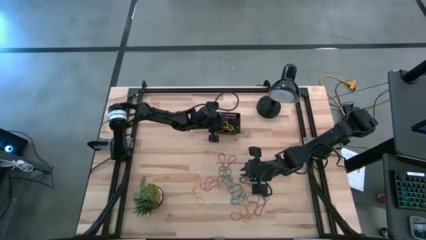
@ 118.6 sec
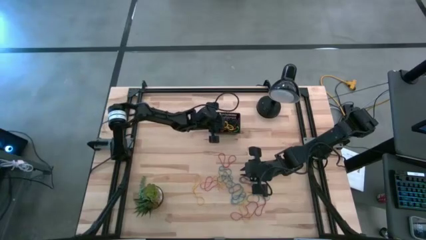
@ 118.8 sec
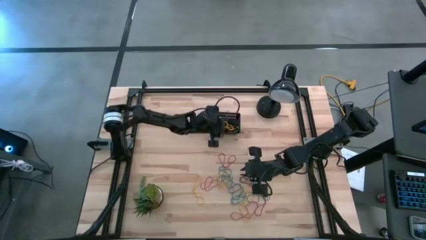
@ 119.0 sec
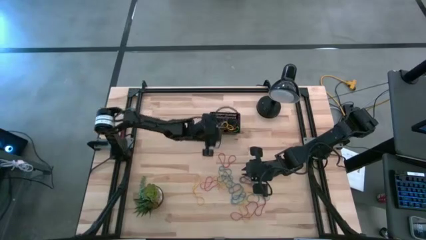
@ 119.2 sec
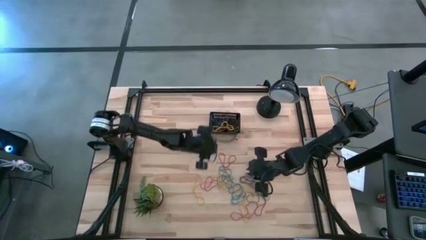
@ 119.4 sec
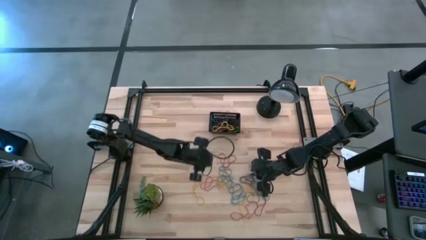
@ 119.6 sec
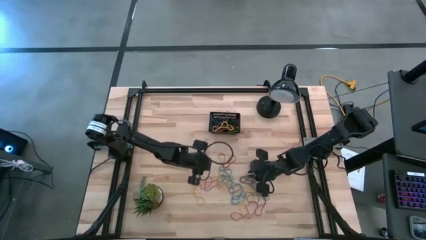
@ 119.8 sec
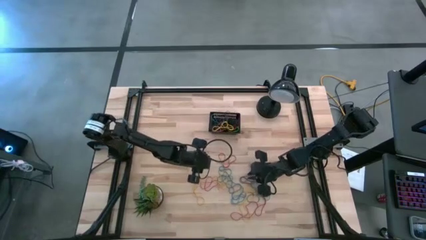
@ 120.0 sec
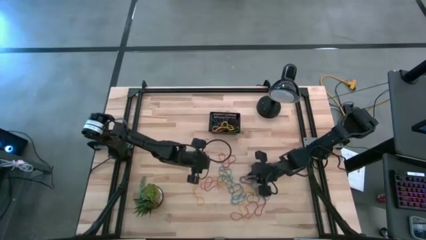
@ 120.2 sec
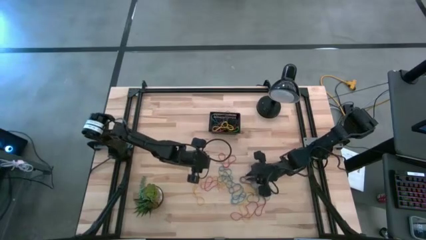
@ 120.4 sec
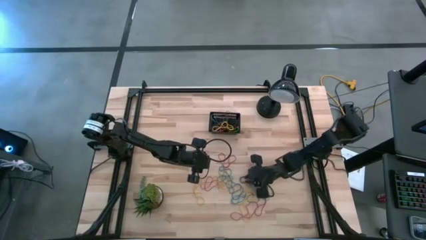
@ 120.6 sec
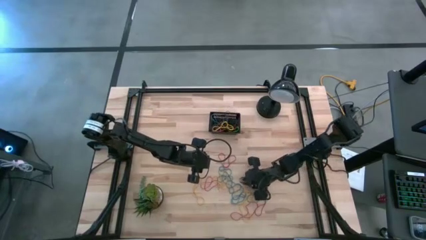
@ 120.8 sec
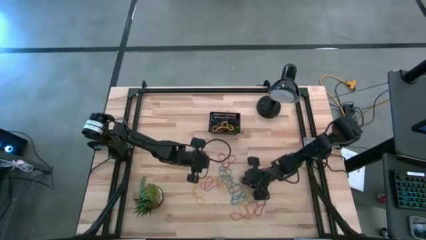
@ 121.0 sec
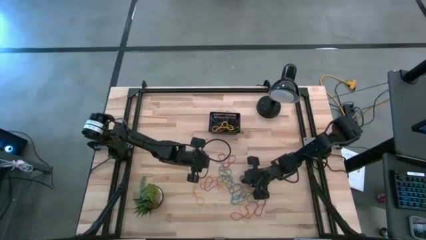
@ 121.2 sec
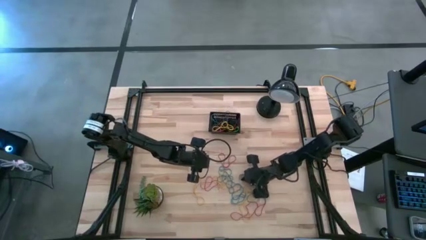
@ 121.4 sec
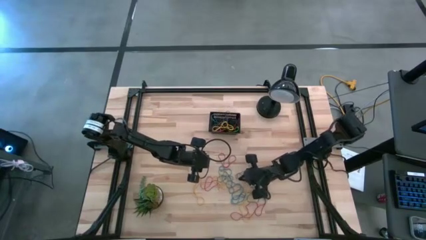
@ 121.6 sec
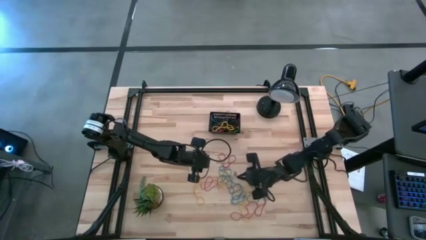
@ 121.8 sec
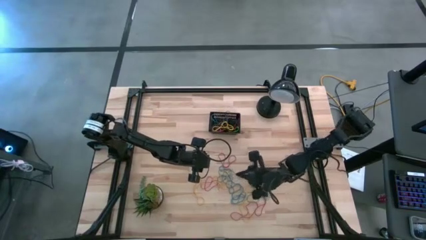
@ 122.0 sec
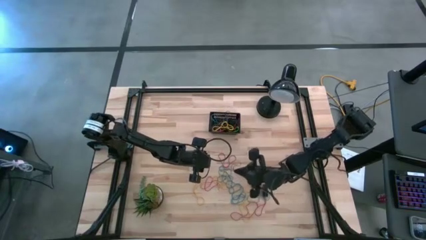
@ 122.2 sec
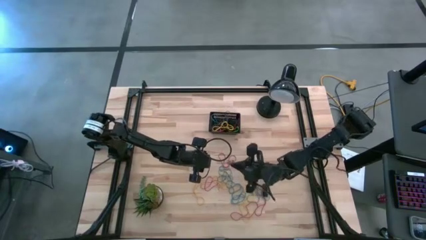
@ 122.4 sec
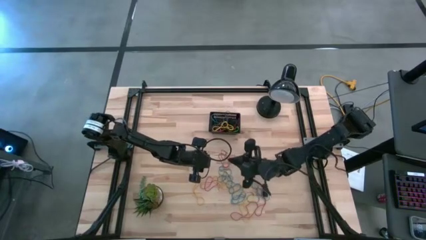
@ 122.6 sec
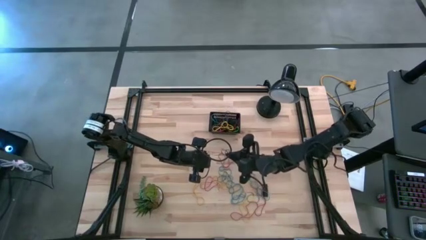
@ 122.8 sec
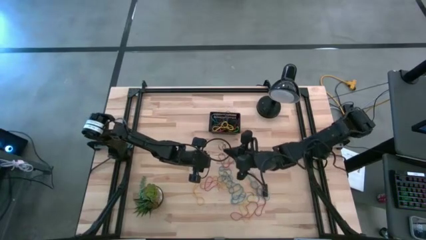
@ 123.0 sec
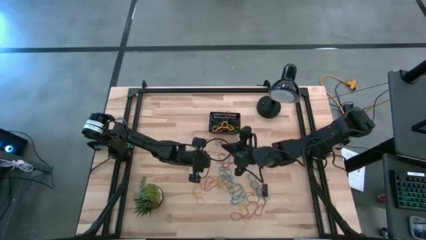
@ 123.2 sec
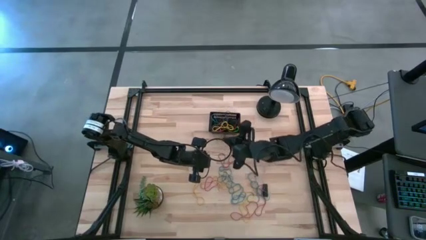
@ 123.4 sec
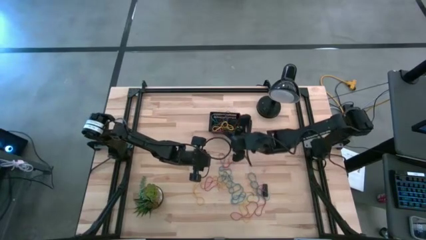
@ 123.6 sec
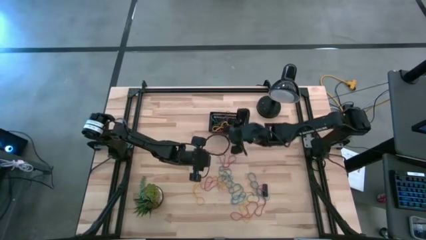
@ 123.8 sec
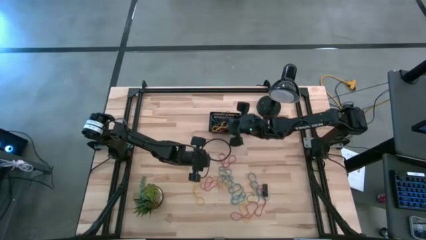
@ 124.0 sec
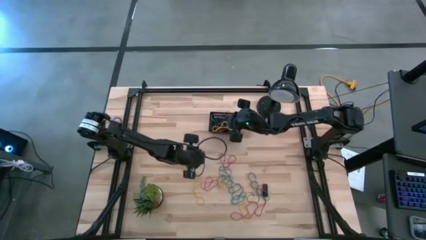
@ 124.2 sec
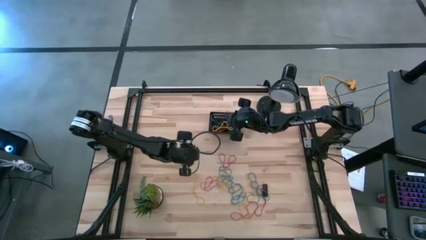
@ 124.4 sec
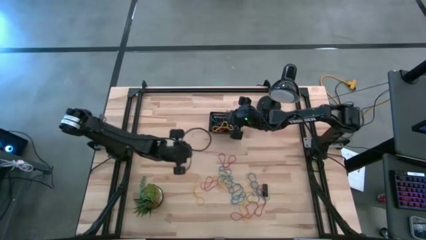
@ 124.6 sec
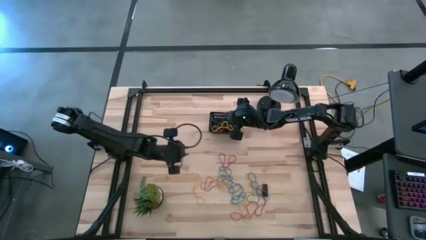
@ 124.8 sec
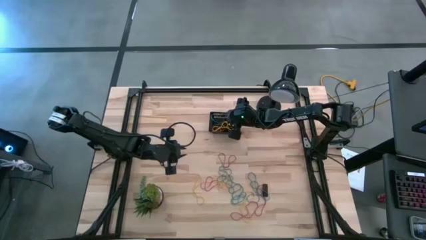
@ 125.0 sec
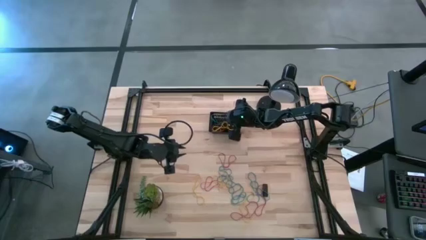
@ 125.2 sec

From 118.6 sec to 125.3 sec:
Task: Pick and place rubber bands into bin
Put the purple rubber band into the basket

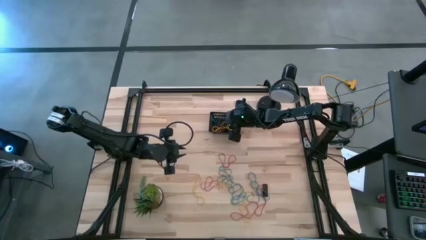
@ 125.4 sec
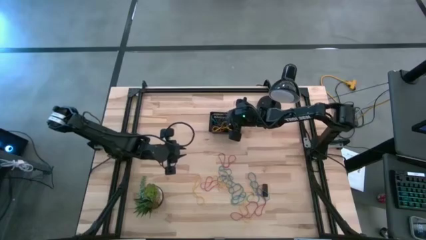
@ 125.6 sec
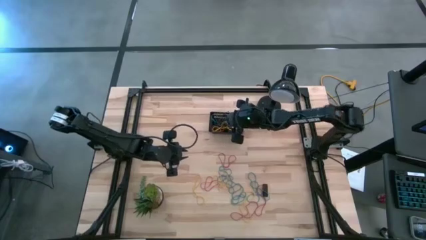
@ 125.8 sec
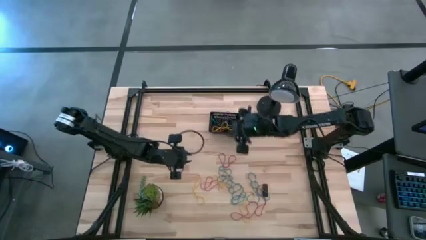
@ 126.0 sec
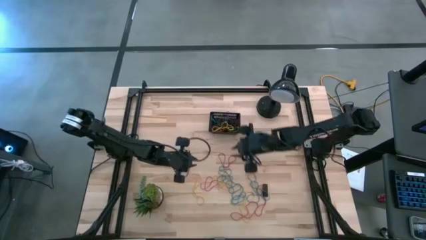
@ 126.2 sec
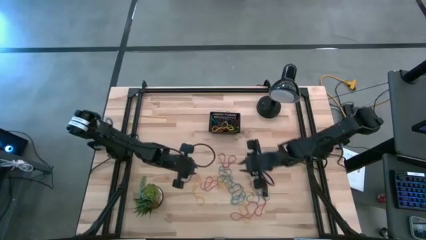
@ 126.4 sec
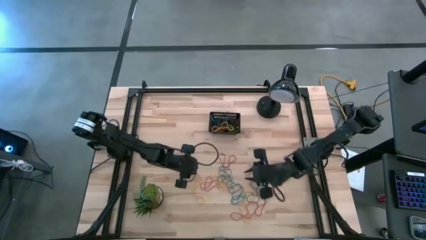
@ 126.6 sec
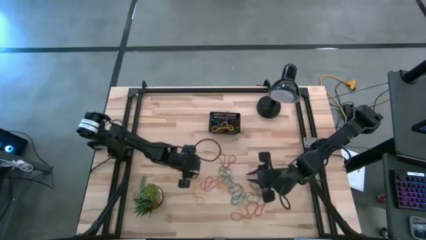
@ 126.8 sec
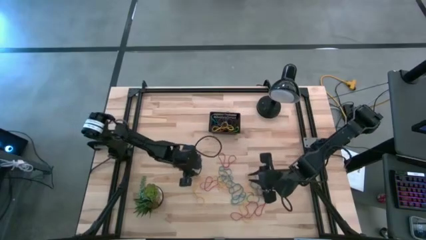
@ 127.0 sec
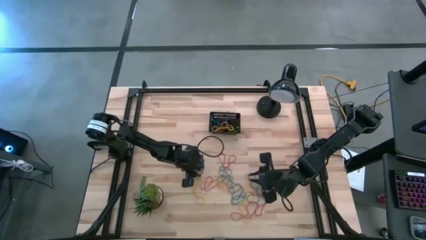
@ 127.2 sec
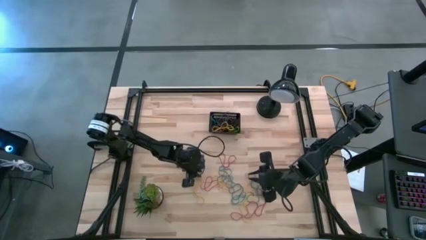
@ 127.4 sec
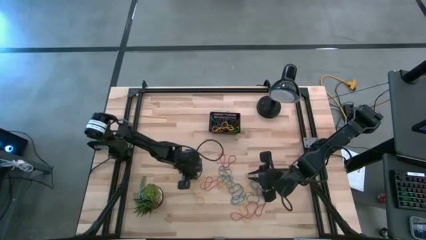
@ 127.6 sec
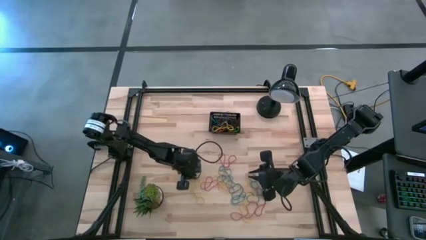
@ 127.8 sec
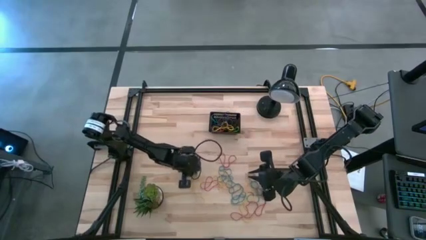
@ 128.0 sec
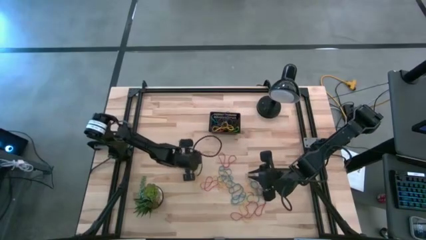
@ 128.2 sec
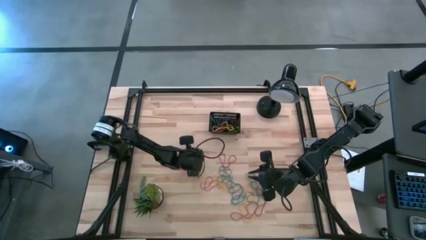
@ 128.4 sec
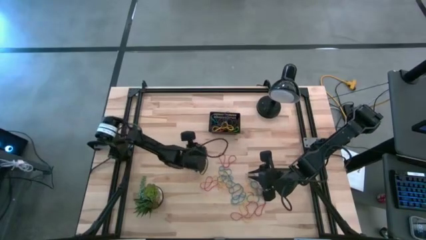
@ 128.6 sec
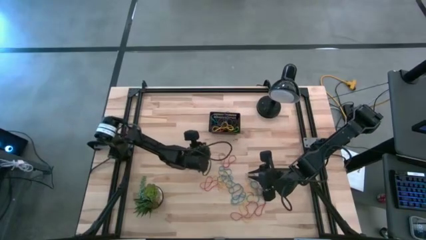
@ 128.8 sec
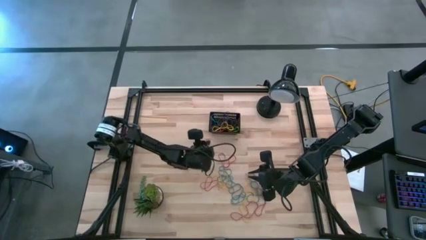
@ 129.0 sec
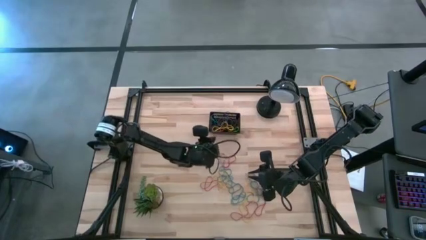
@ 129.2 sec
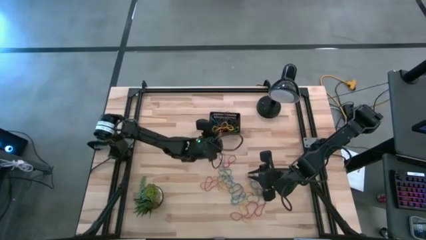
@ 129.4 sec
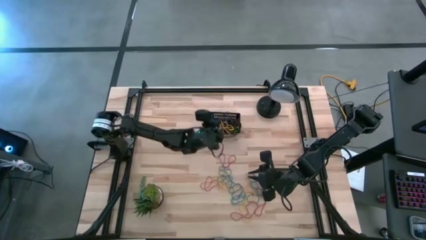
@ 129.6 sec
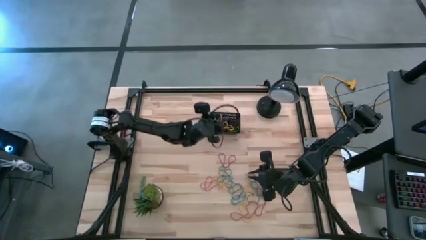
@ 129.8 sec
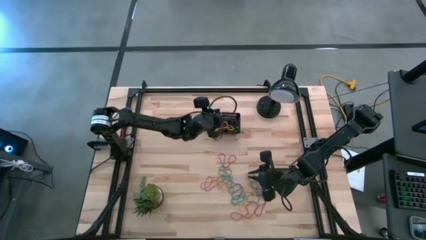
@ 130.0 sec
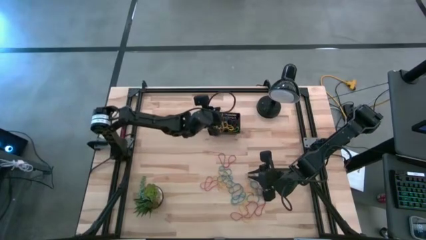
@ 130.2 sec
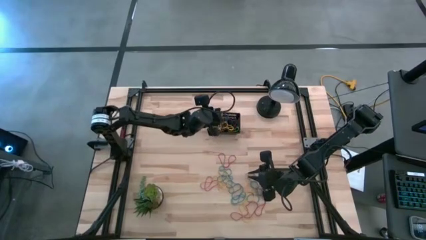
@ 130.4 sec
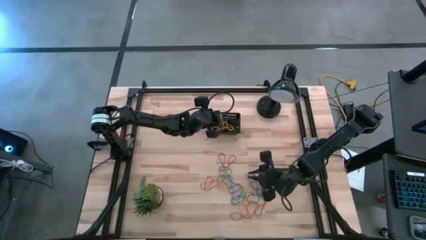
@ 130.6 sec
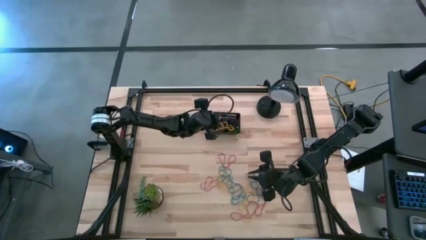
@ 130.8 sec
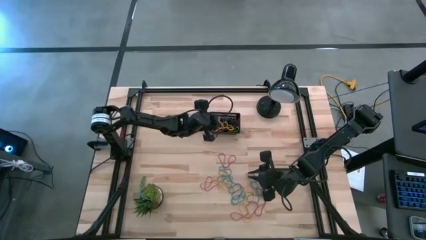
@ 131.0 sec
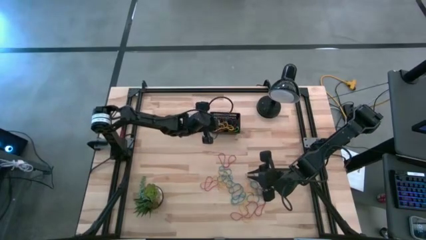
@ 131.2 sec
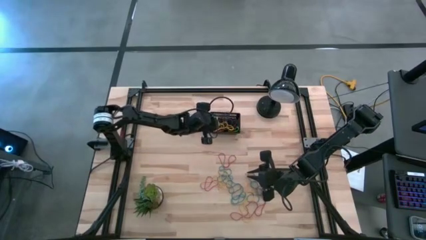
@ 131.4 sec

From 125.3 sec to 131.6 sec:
Put the yellow rubber band into the basket
